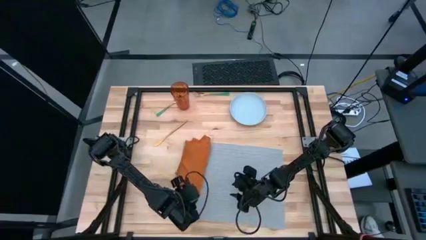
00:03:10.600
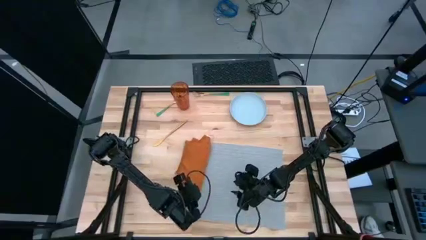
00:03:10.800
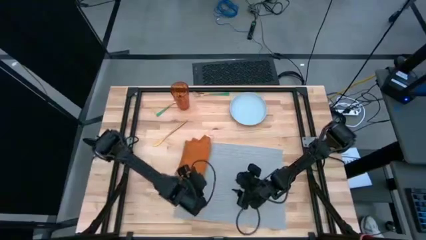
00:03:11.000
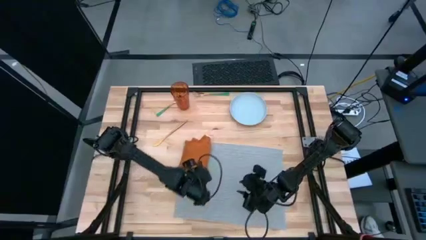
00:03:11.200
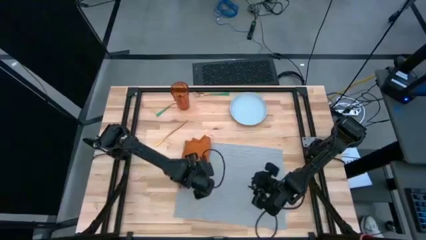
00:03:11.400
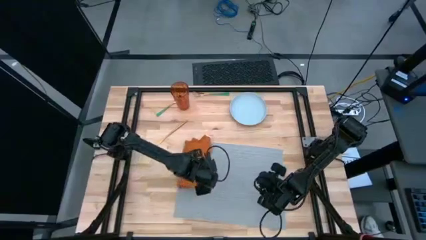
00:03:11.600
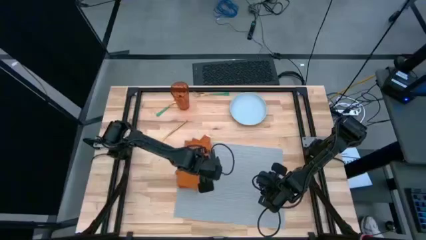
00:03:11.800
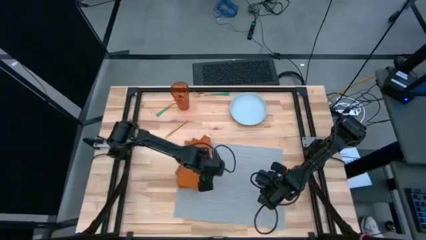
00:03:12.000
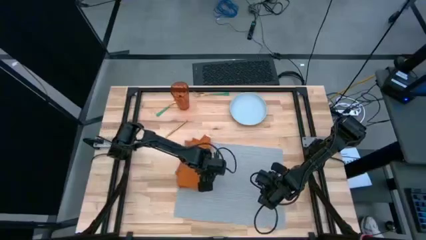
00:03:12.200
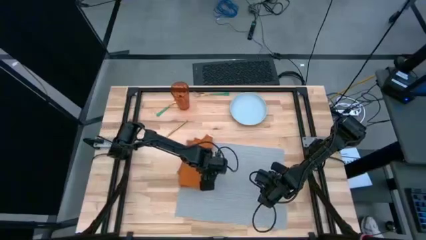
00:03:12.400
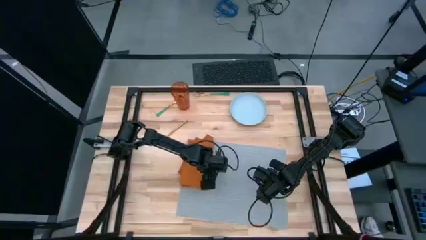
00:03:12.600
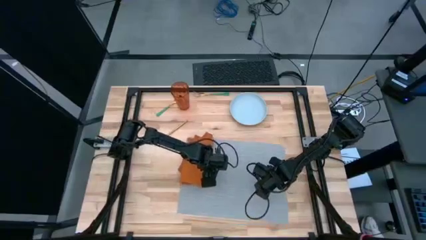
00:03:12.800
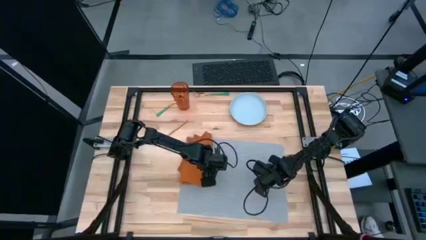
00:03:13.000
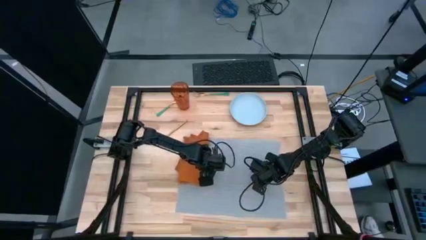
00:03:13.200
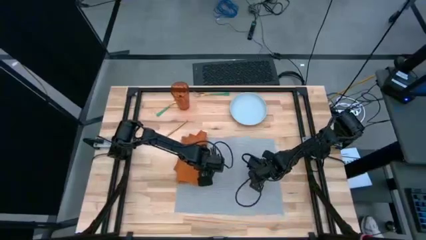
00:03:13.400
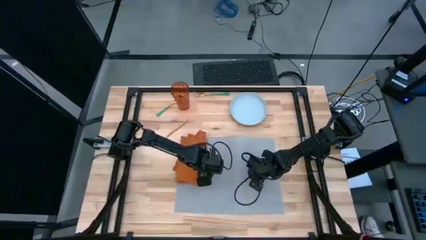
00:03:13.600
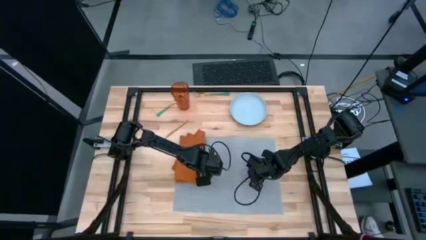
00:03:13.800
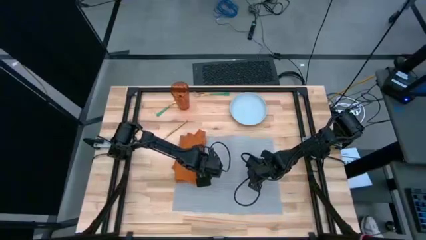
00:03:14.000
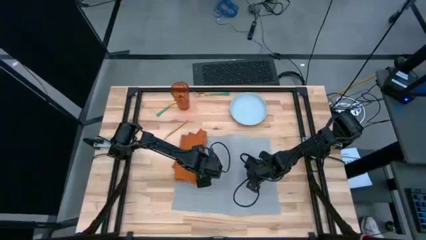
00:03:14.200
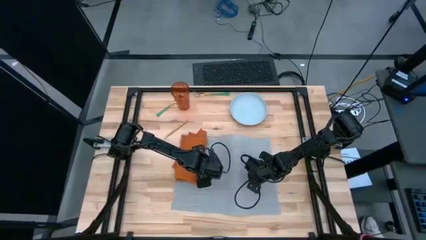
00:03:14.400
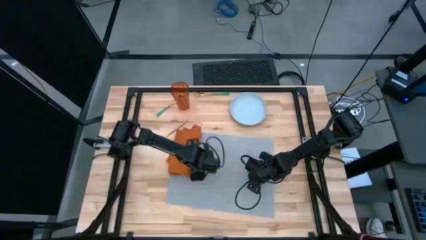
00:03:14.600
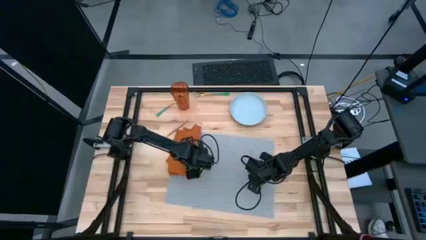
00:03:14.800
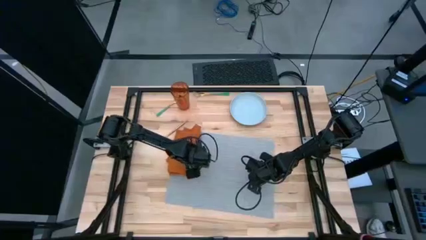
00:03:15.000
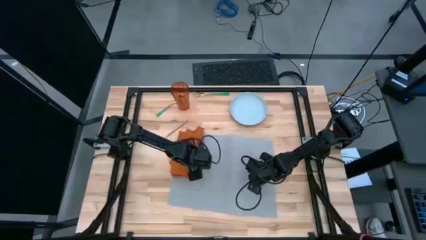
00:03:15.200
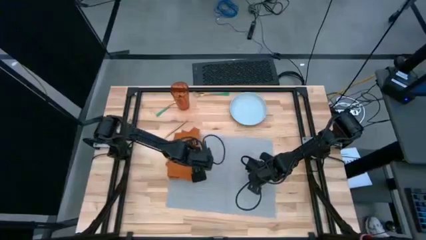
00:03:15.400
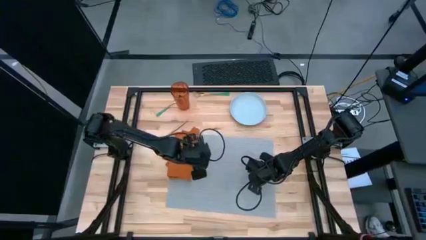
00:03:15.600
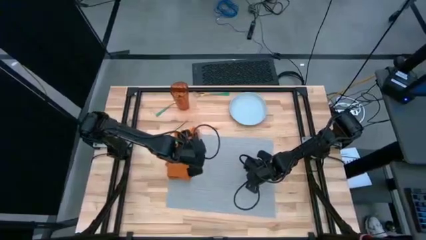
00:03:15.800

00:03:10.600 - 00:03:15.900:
Task: Set table place
Adjust the gray table mat

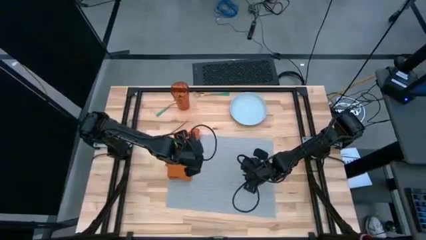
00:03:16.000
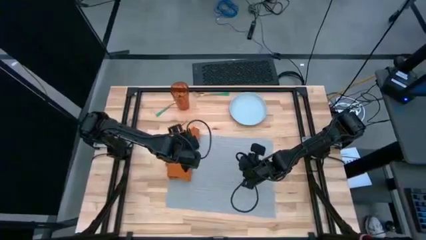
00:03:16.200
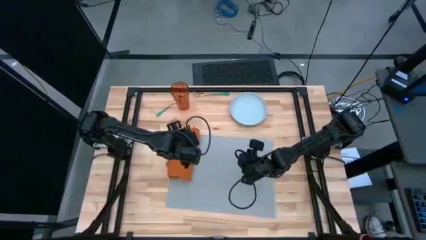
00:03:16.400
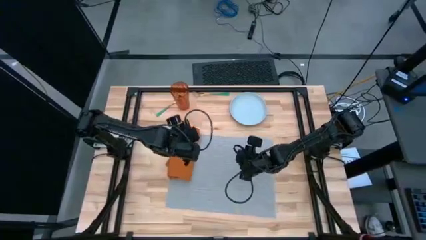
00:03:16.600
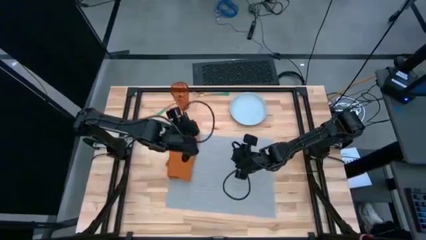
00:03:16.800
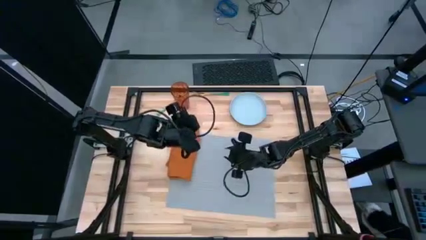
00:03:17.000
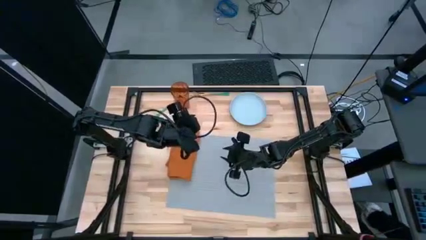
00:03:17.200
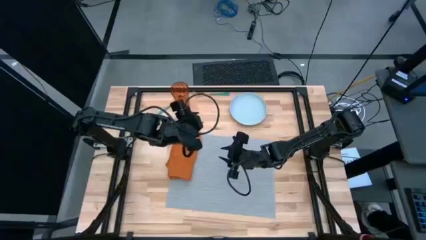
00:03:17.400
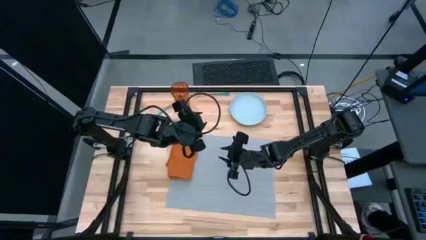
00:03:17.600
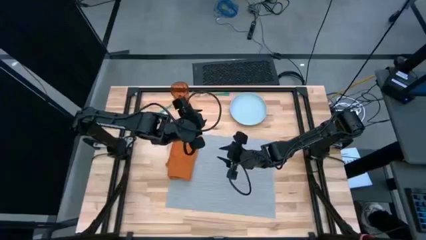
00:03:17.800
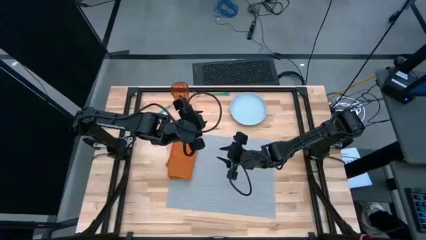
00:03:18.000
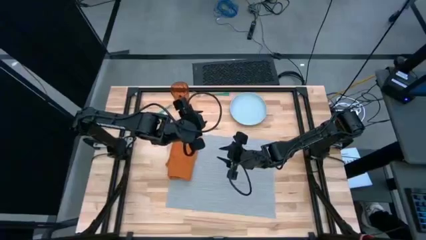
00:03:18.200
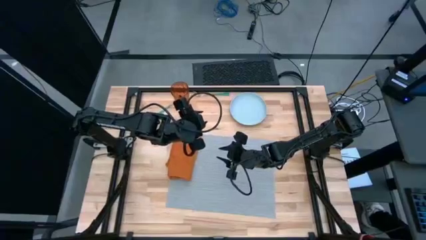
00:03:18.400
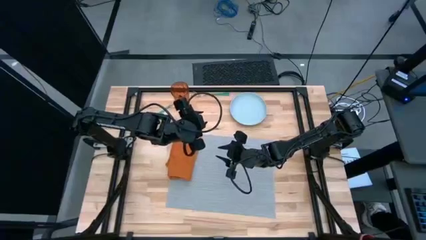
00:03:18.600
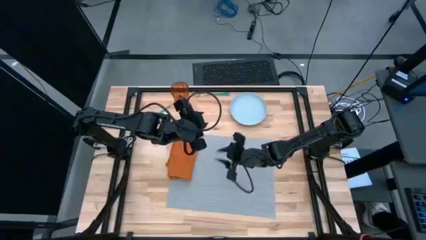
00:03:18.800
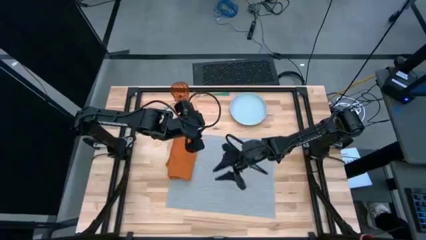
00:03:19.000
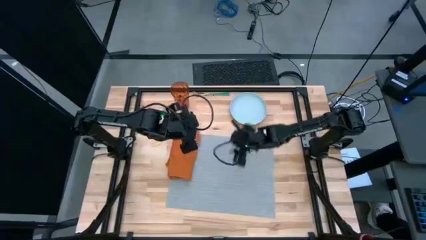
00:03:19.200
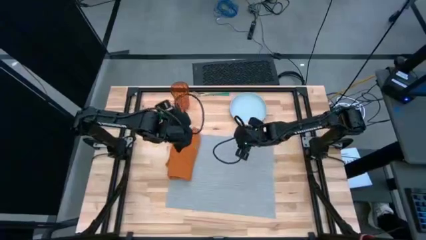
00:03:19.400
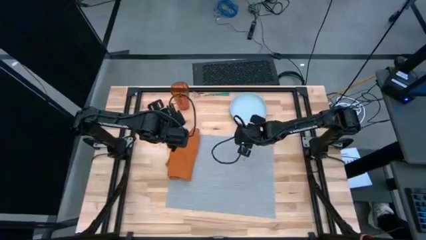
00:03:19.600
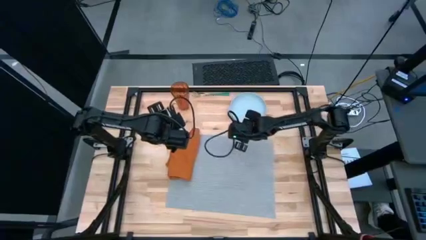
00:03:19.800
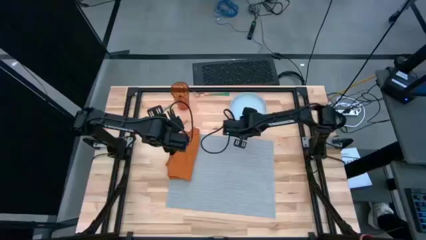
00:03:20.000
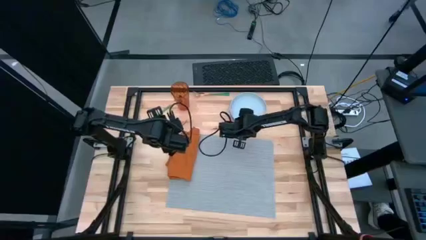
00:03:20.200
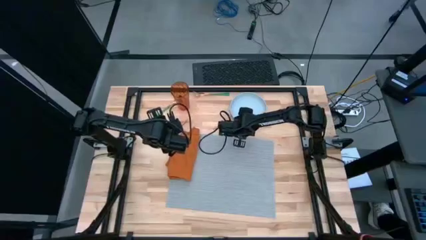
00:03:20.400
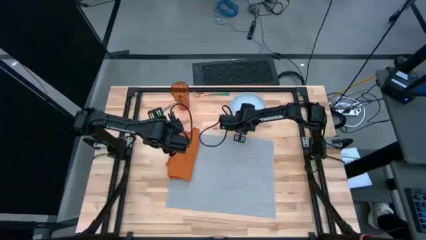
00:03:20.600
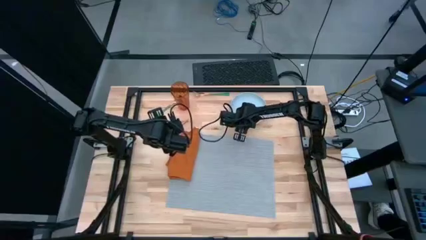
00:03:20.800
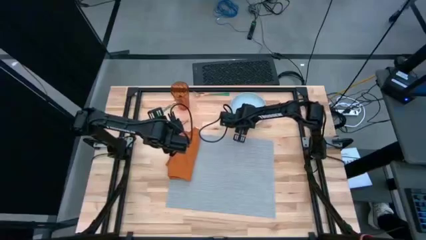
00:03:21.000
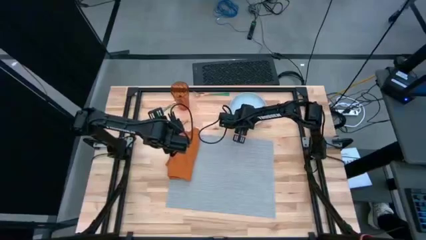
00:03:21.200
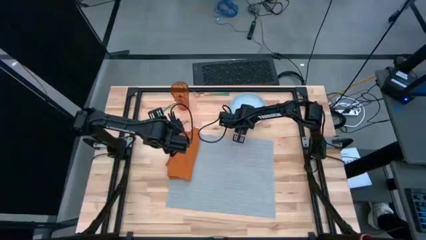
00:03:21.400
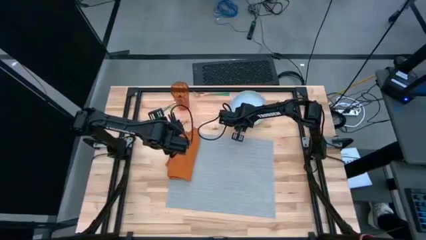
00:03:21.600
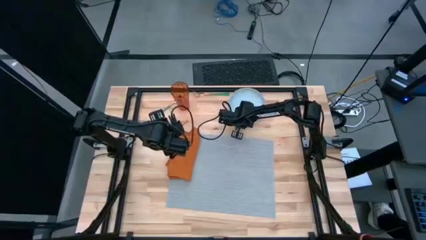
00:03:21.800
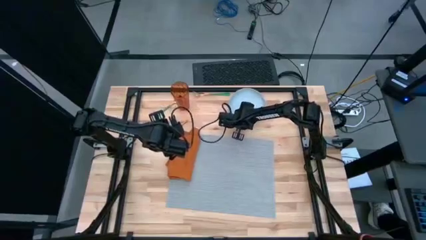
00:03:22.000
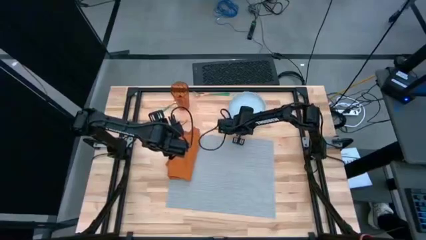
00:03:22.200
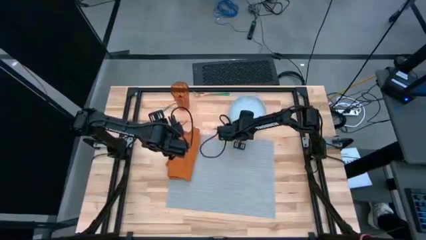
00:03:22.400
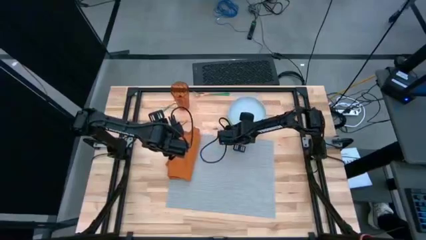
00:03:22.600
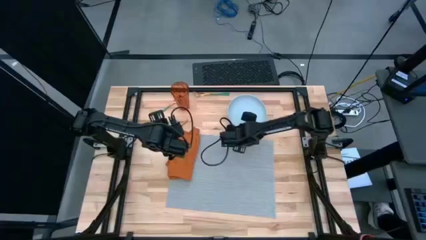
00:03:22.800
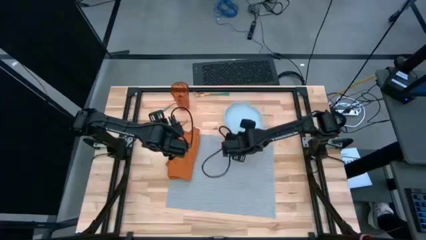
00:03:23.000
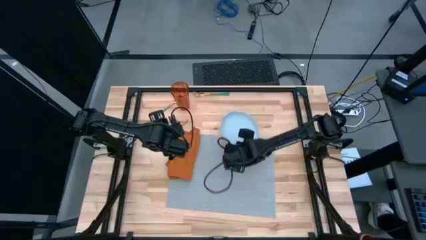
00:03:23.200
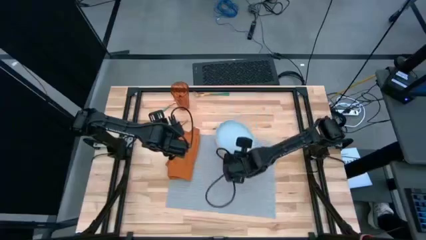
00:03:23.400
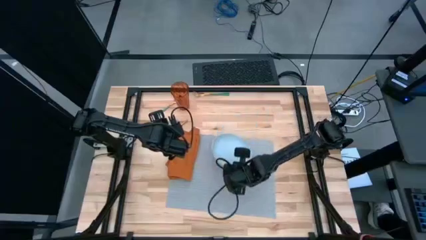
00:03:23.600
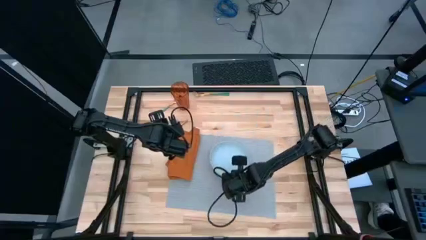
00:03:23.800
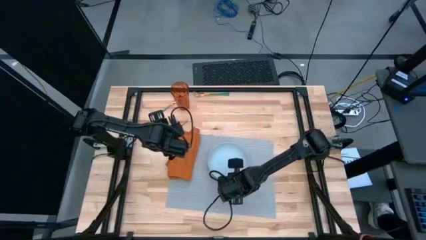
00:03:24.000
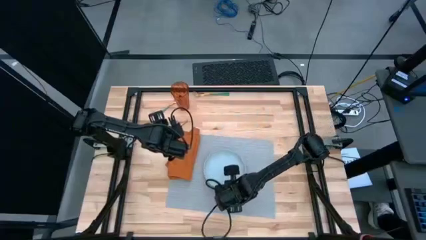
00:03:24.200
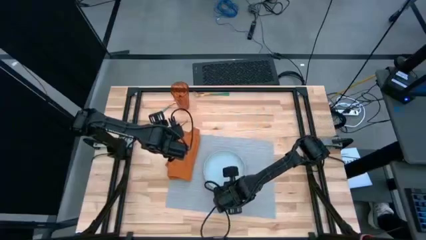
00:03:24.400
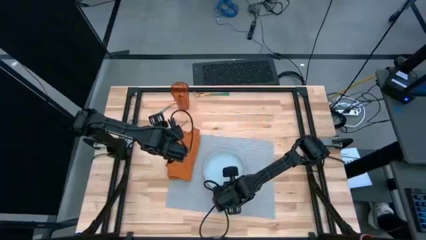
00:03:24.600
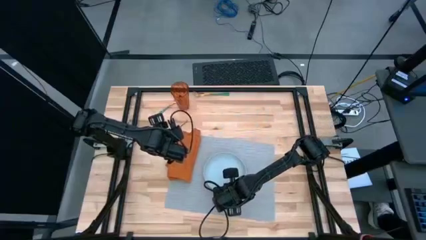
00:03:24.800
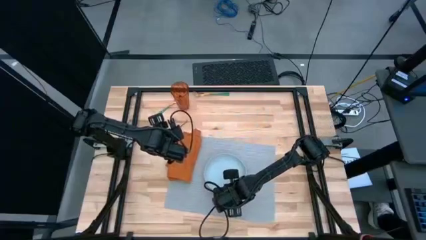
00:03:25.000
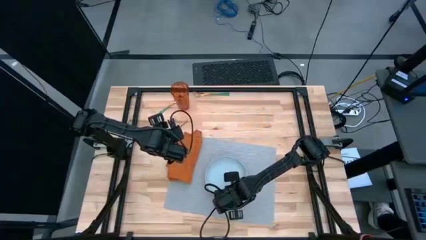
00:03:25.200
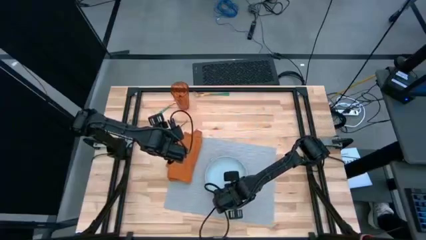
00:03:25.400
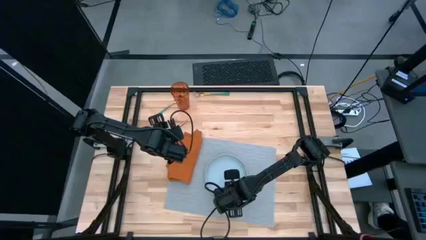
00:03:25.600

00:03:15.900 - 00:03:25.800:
Put the blue plate on the gray table mat

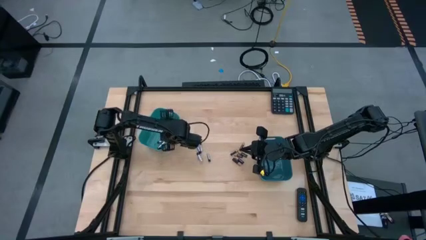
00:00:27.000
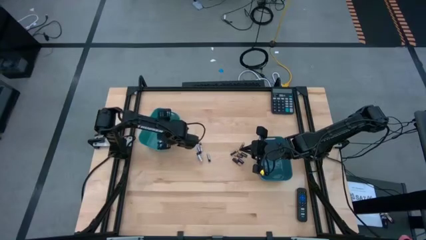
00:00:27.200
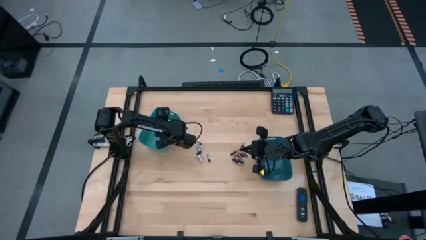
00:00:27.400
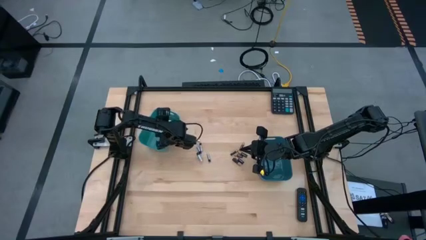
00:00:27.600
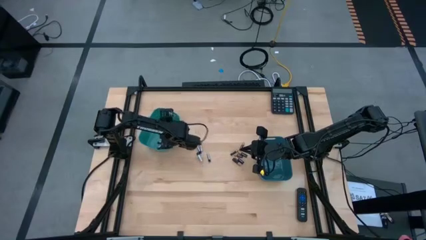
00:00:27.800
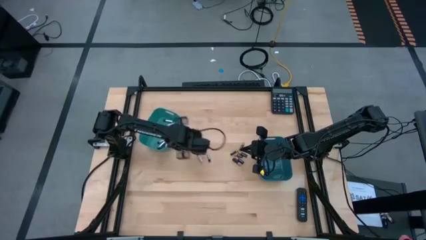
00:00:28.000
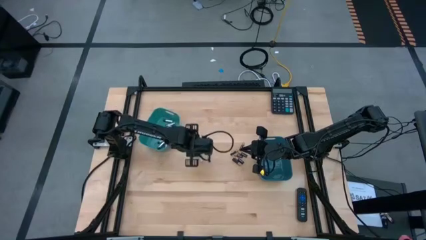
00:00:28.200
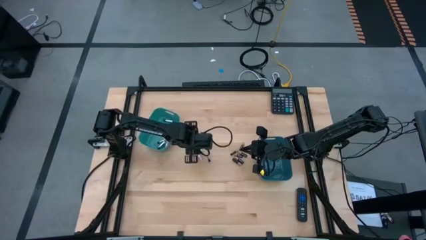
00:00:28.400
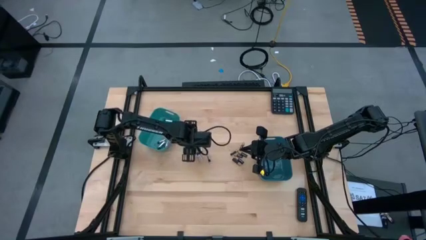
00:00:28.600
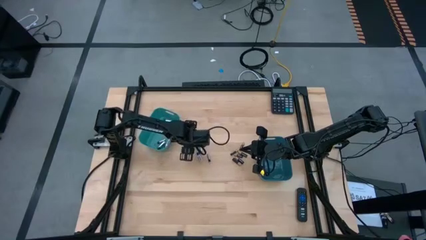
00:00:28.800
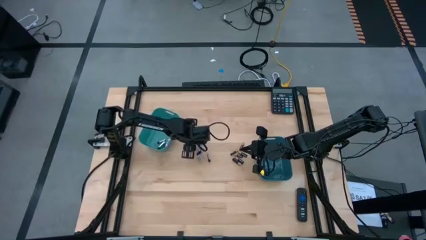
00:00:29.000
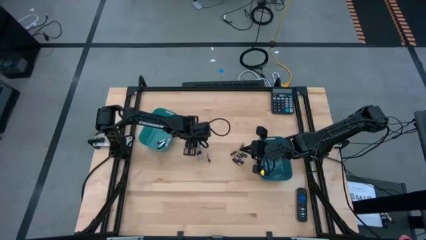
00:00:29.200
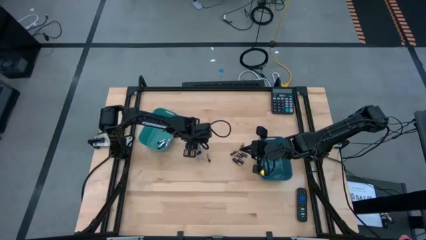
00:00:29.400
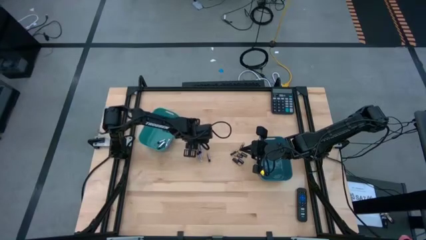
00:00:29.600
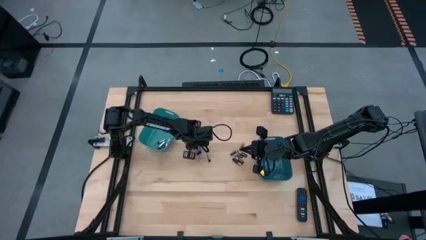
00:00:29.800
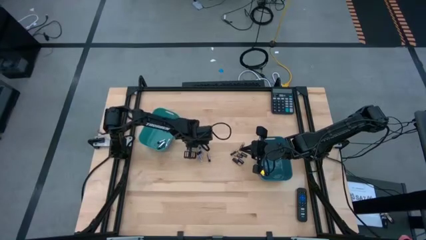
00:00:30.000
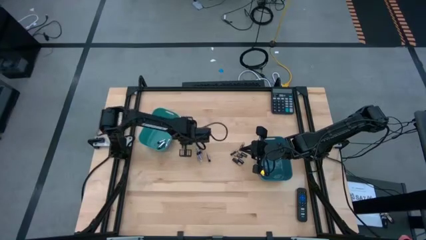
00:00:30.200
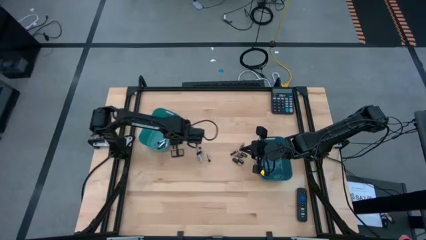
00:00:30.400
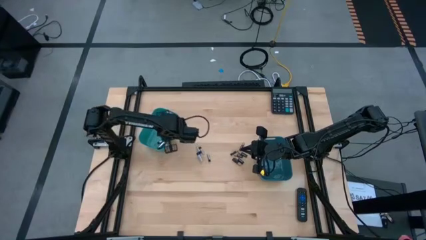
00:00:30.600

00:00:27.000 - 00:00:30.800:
Task: Sort batteries
Put the silver battery into the green bin
